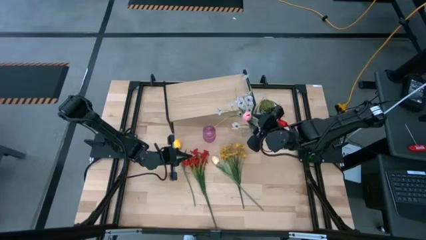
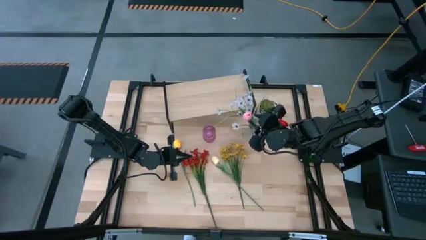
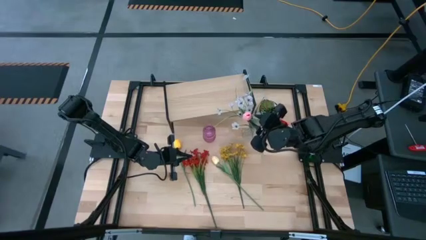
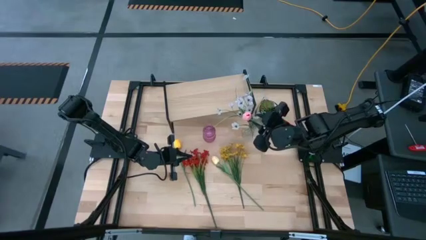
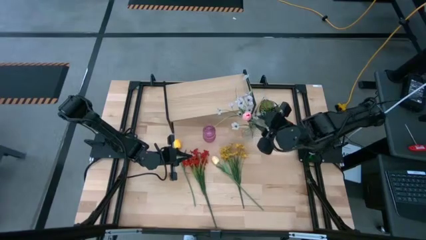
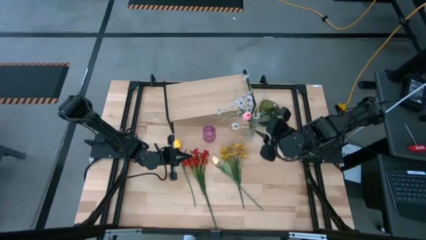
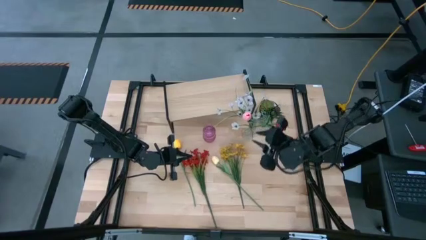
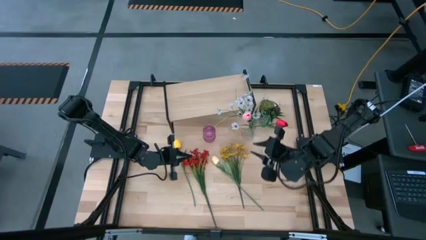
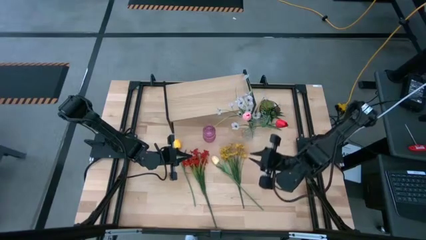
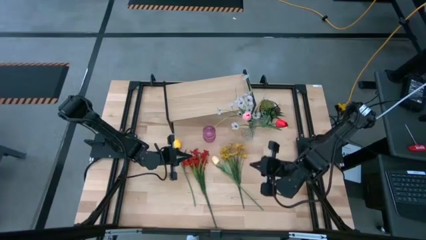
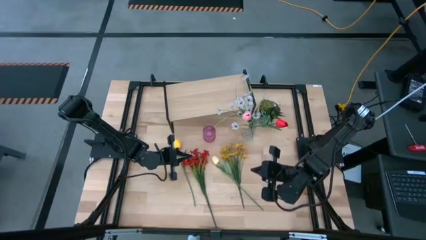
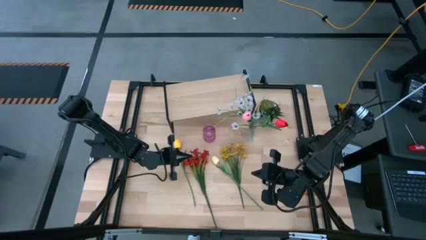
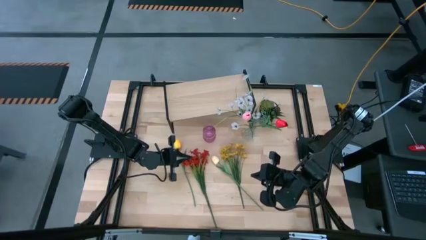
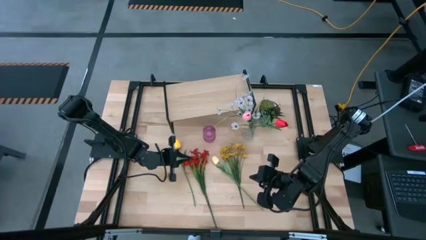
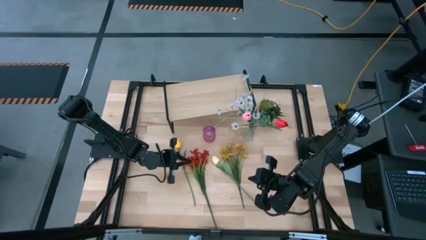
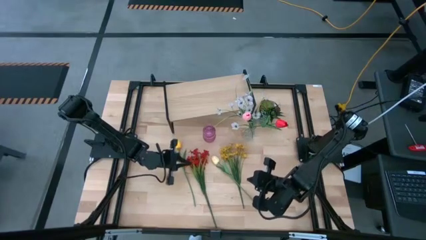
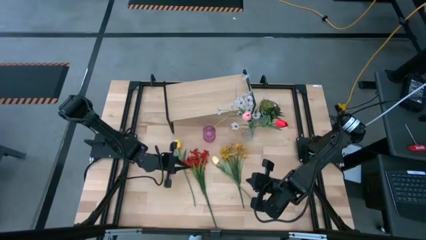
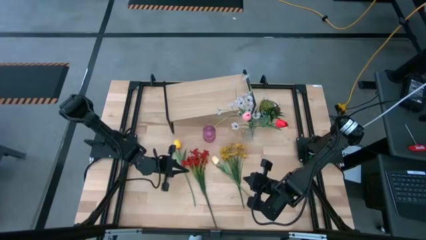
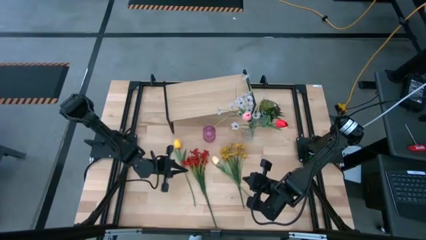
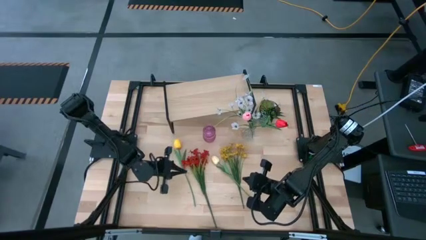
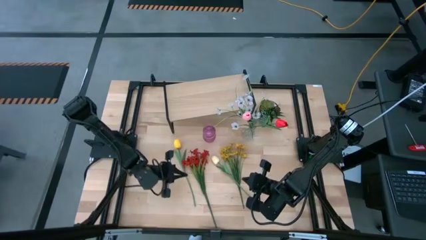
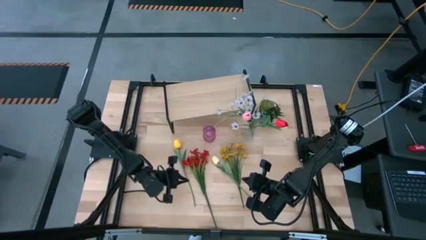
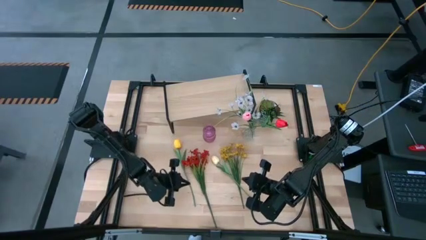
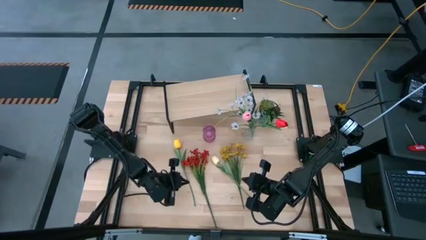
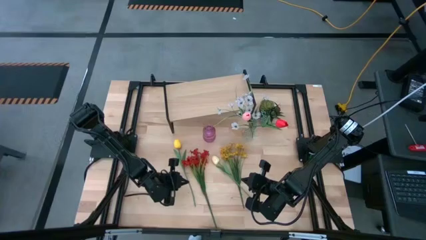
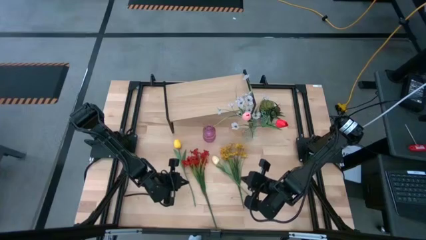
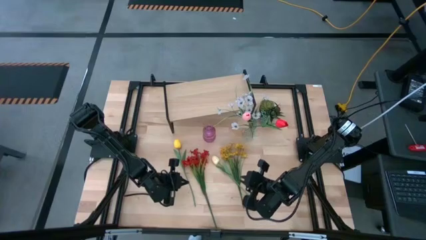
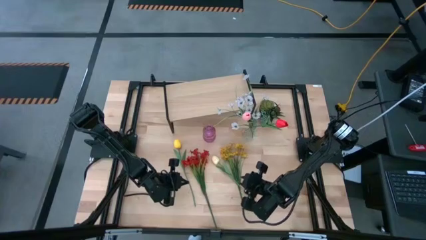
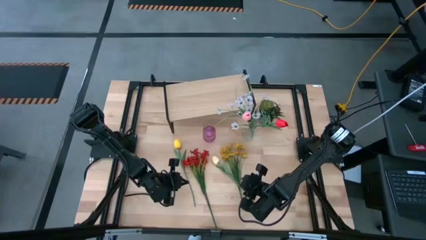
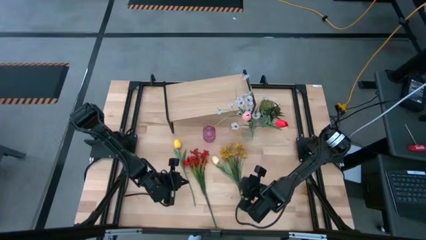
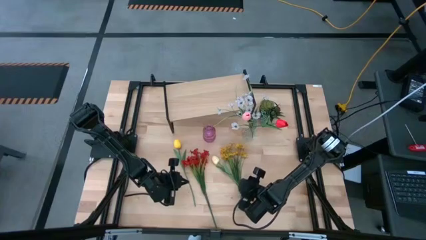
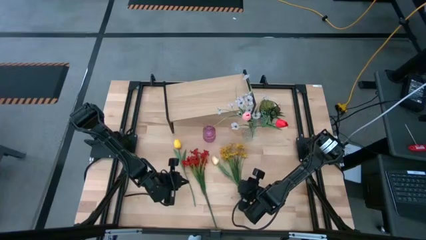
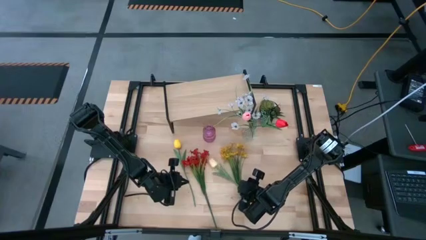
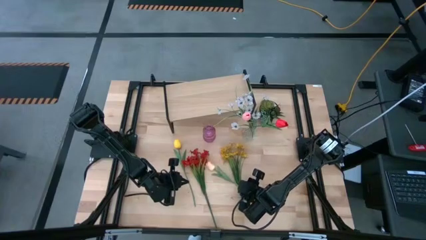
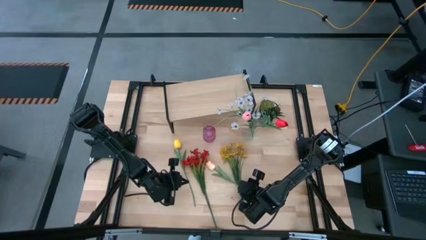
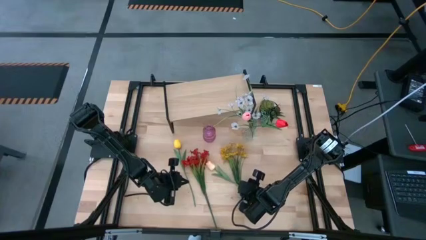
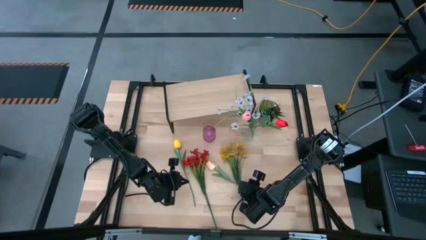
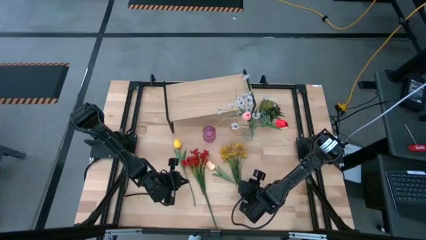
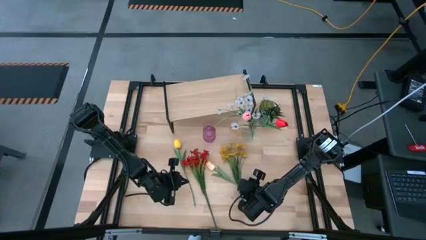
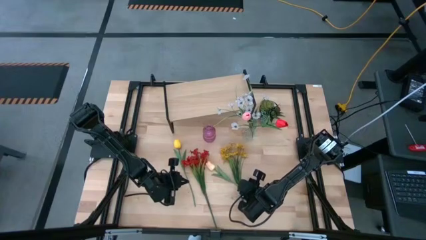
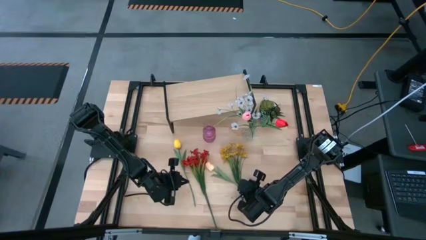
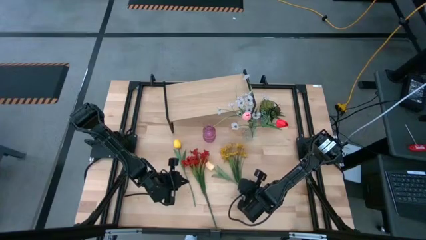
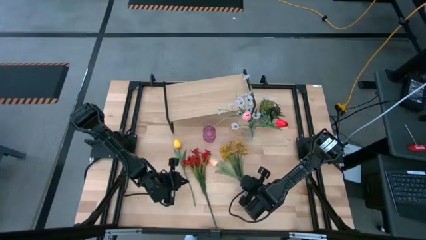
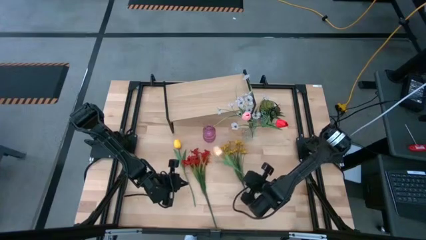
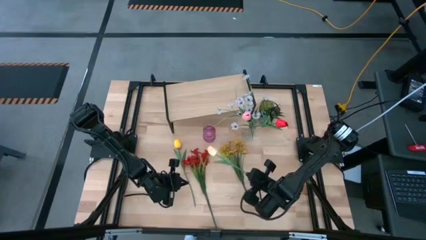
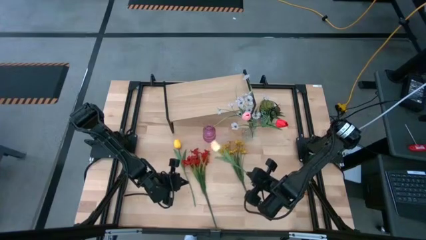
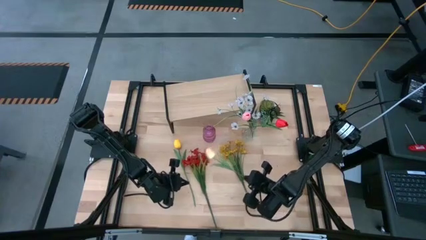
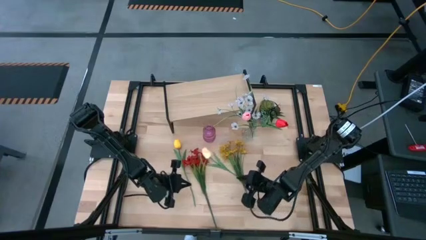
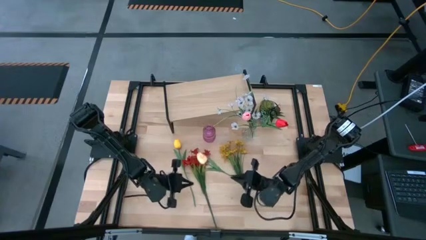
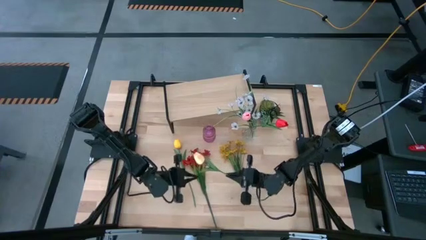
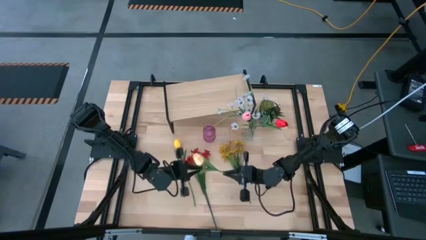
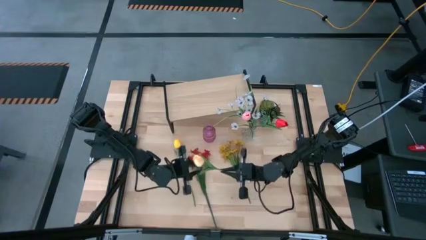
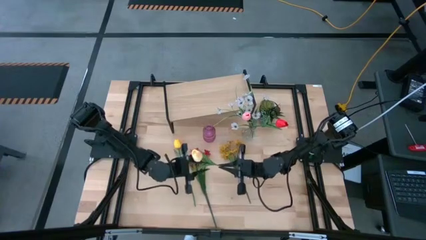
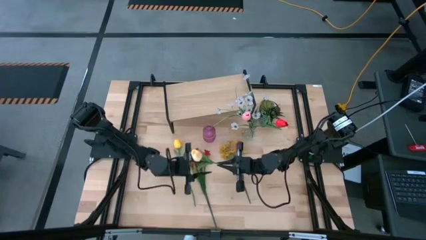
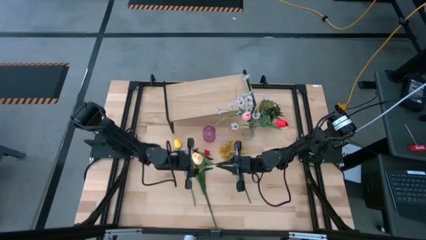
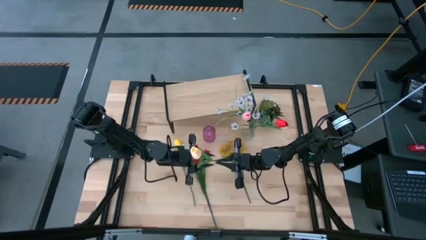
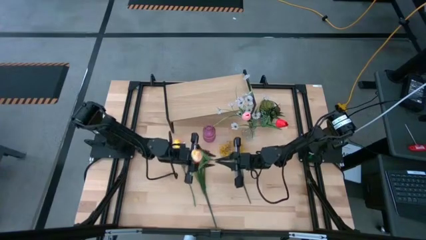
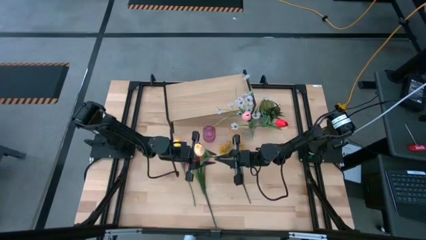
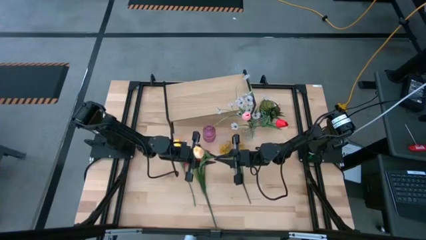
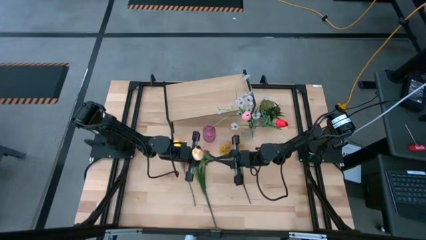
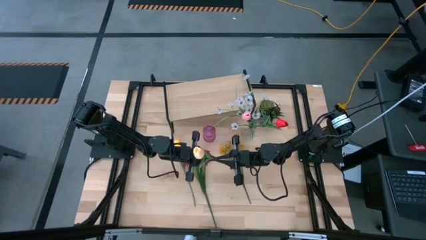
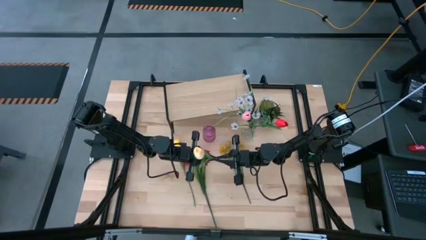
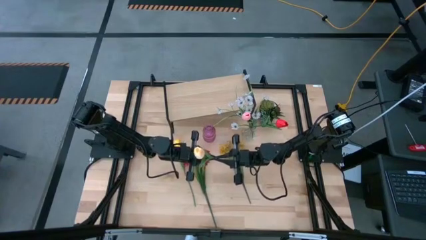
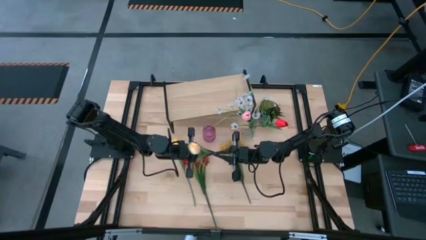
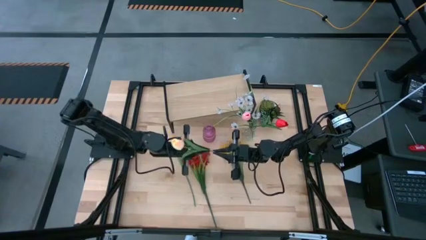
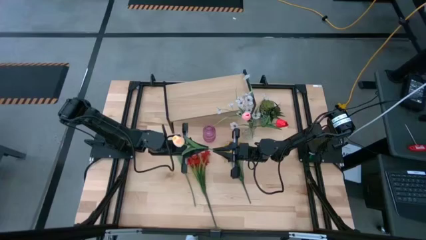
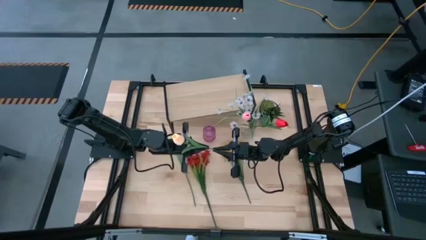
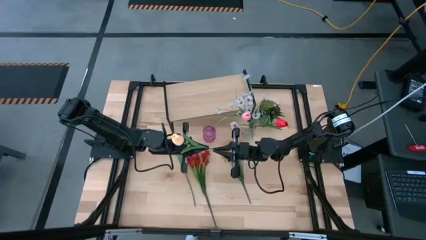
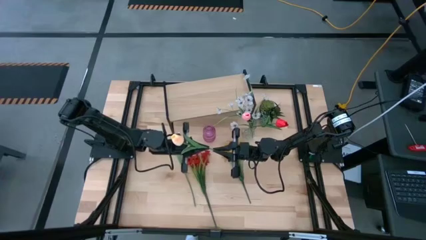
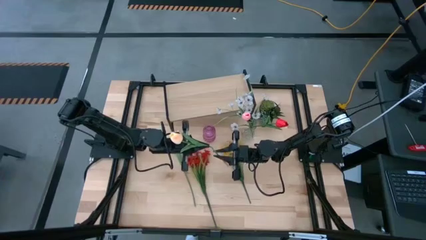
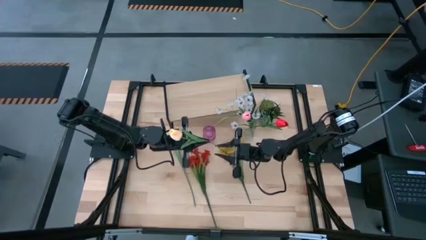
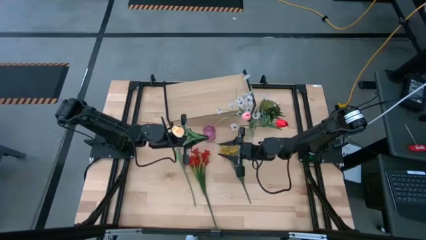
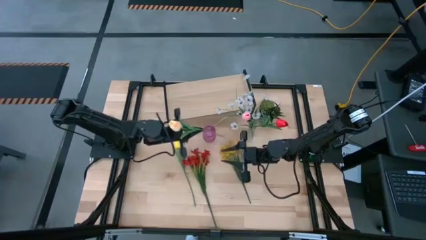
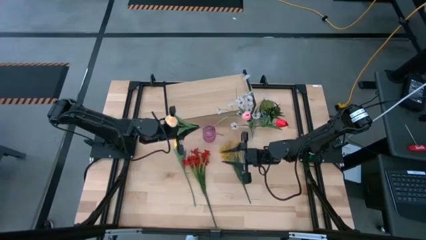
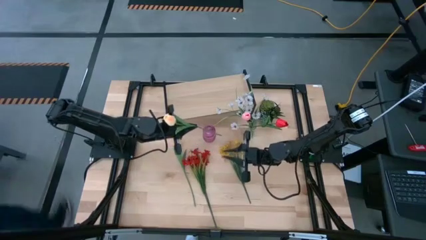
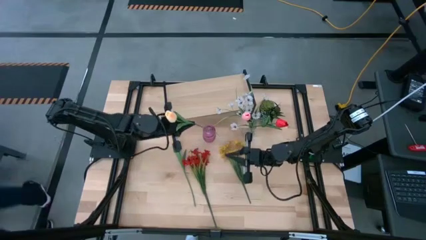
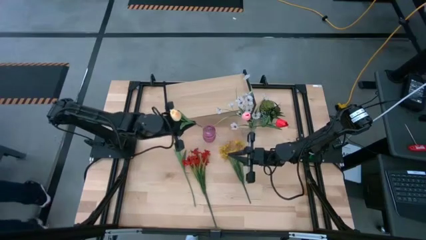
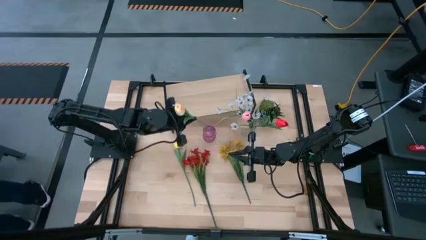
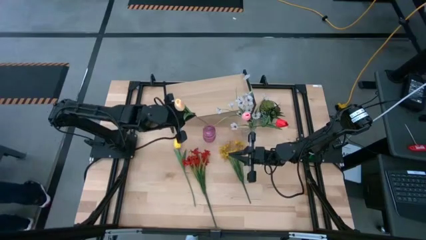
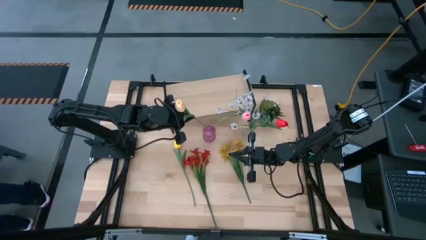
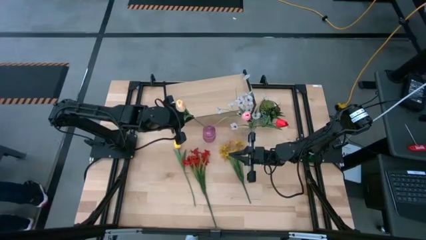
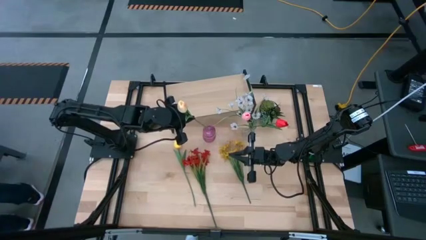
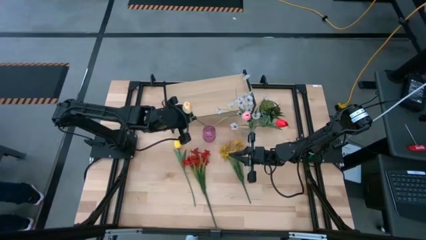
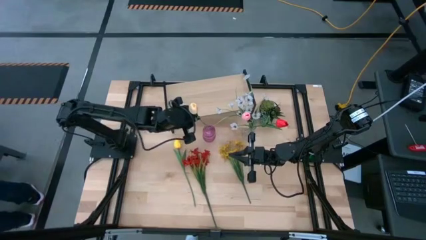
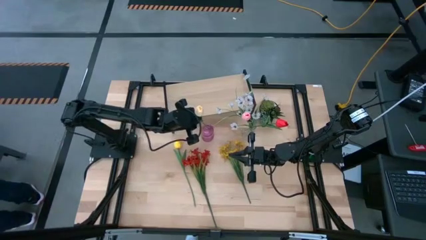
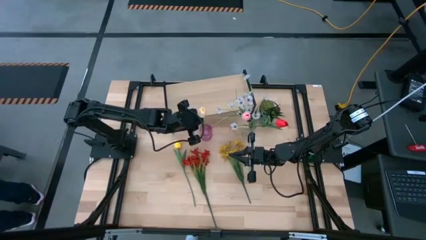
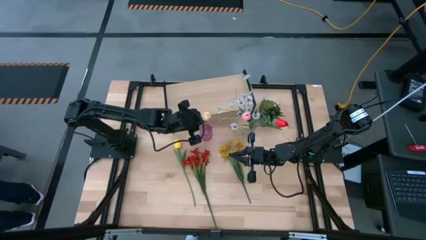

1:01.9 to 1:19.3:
Task: Pick and place flowers into a vace then onto a shelf
Put the white flower into the pink vase
